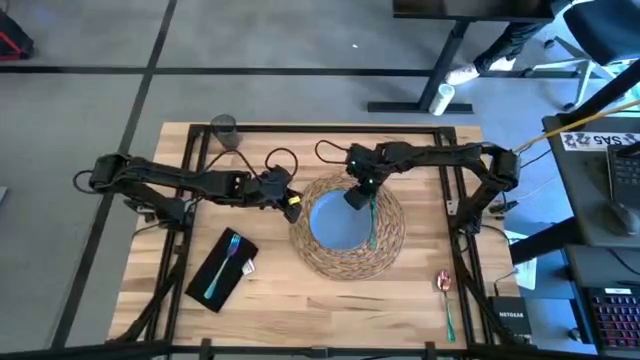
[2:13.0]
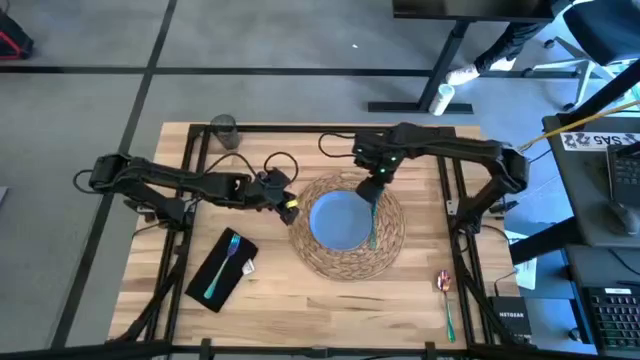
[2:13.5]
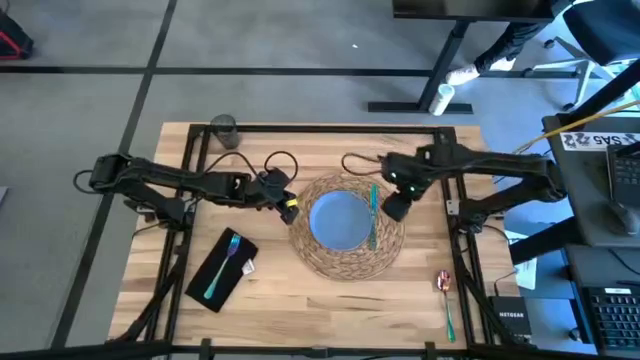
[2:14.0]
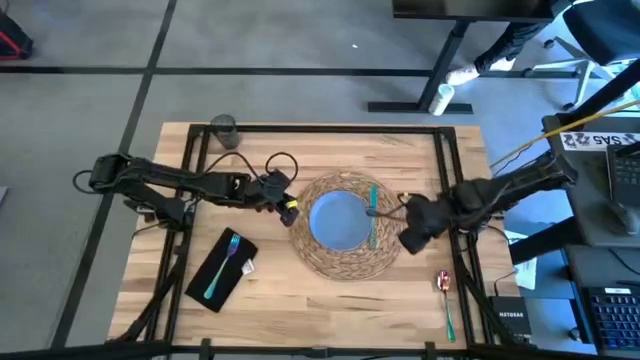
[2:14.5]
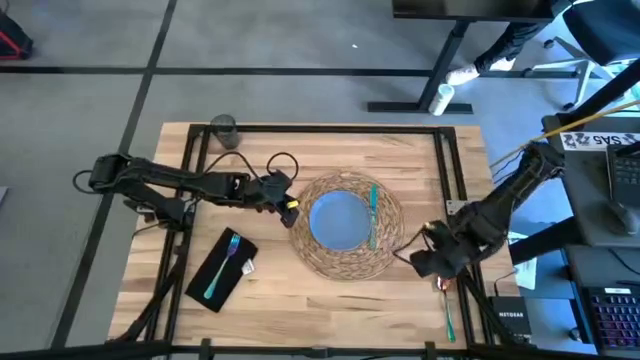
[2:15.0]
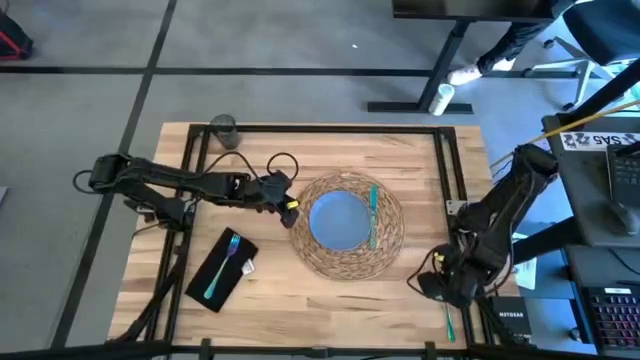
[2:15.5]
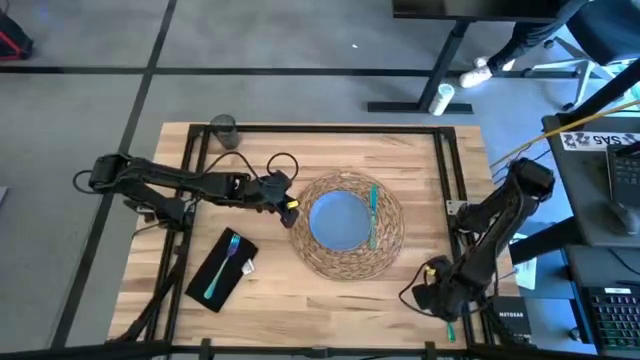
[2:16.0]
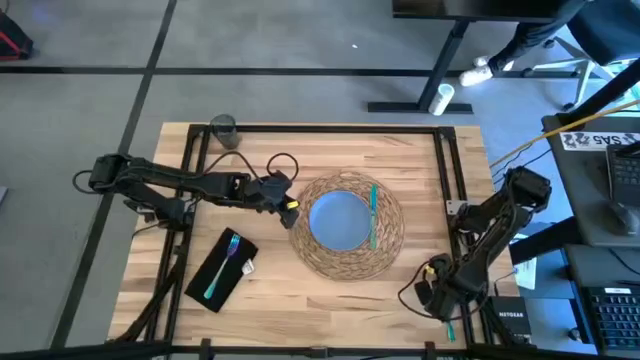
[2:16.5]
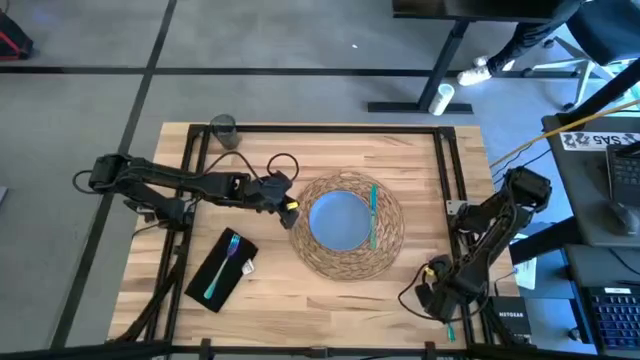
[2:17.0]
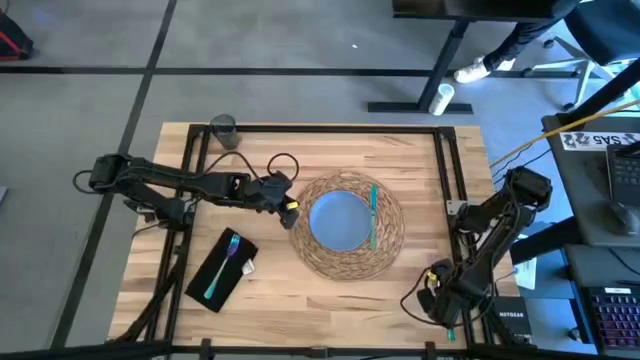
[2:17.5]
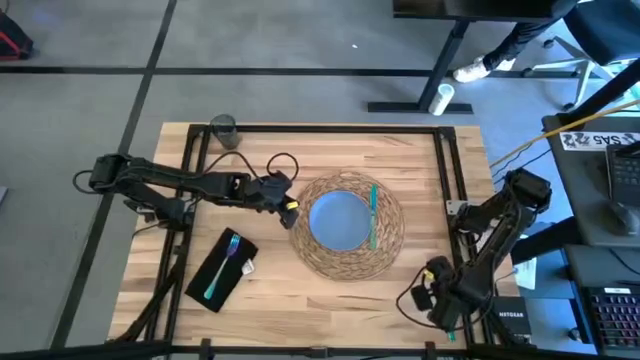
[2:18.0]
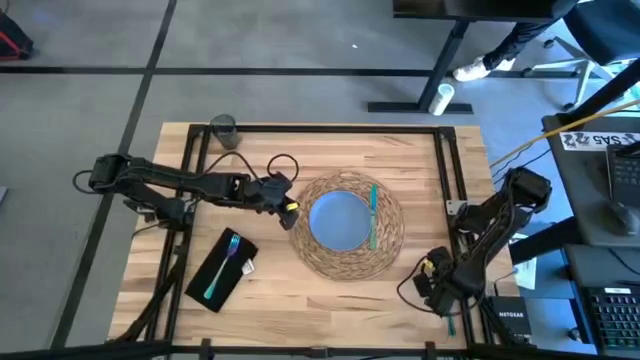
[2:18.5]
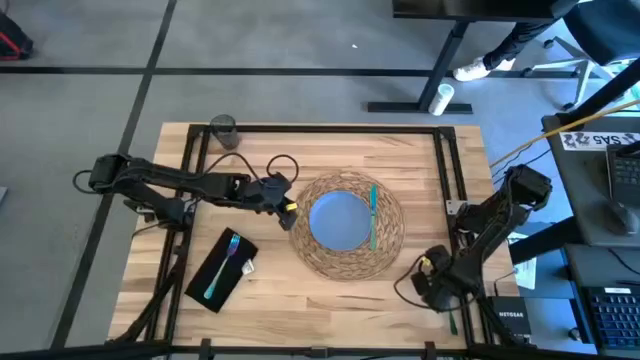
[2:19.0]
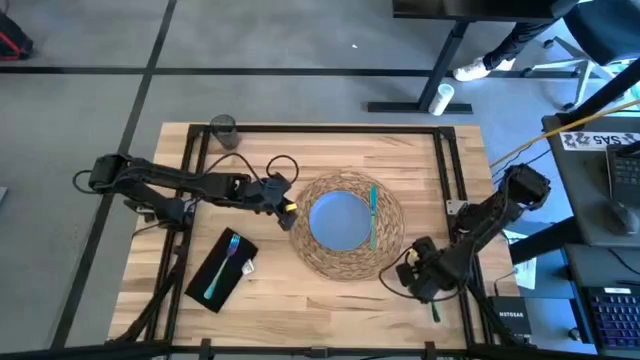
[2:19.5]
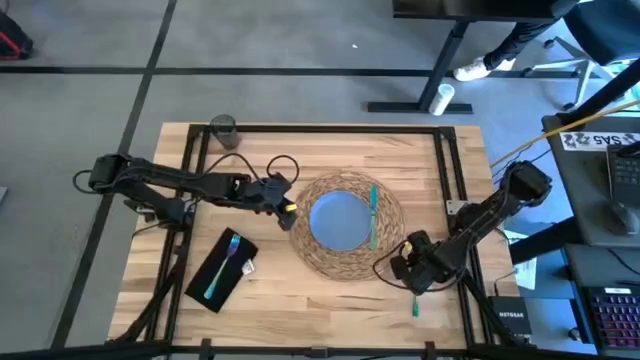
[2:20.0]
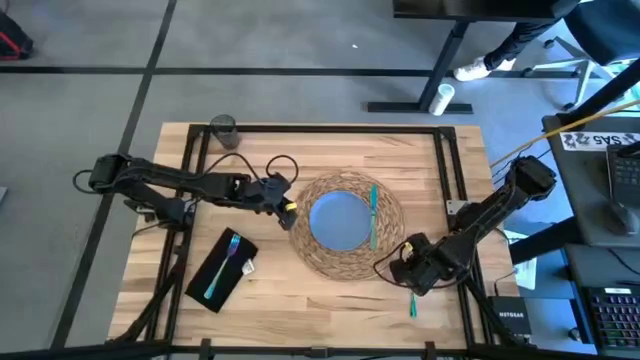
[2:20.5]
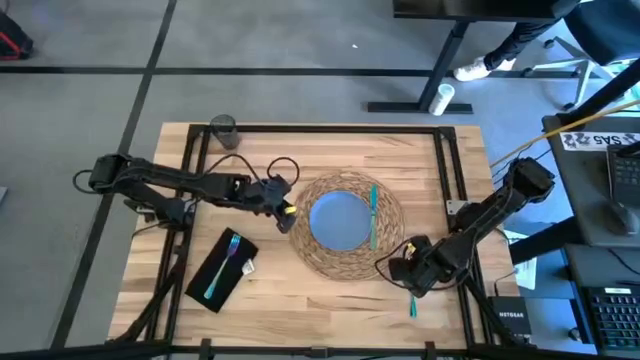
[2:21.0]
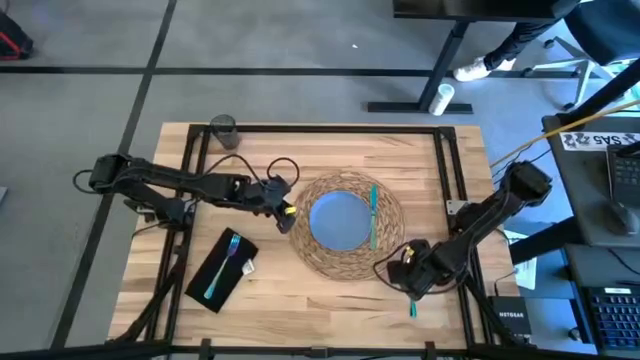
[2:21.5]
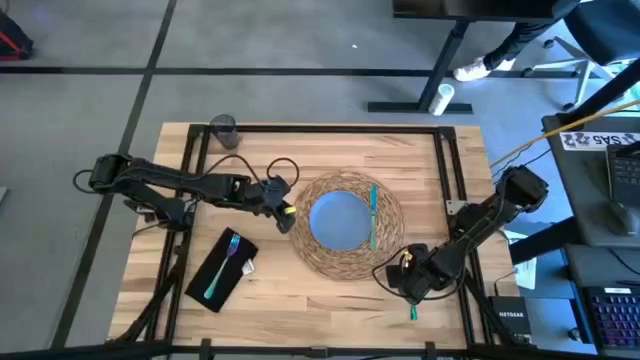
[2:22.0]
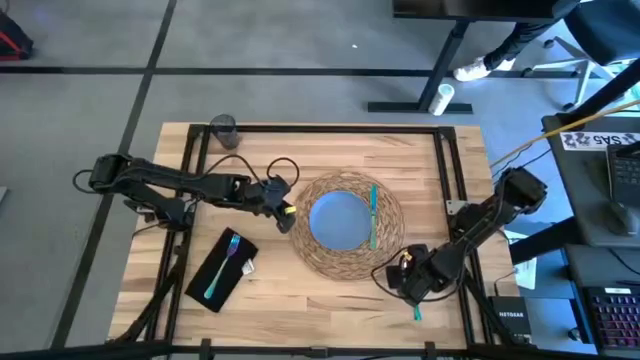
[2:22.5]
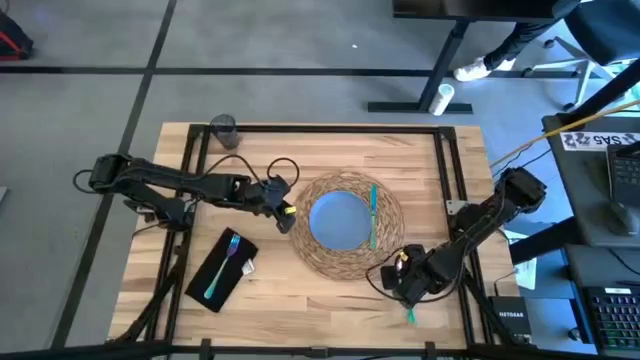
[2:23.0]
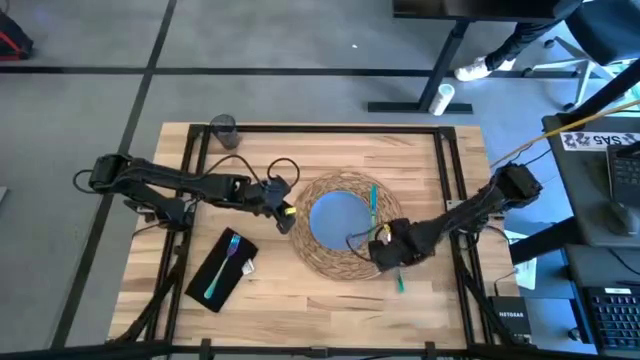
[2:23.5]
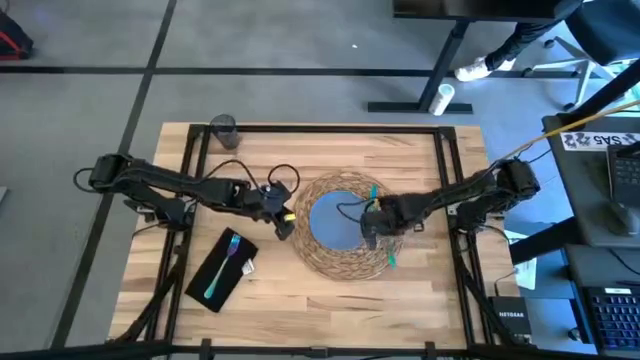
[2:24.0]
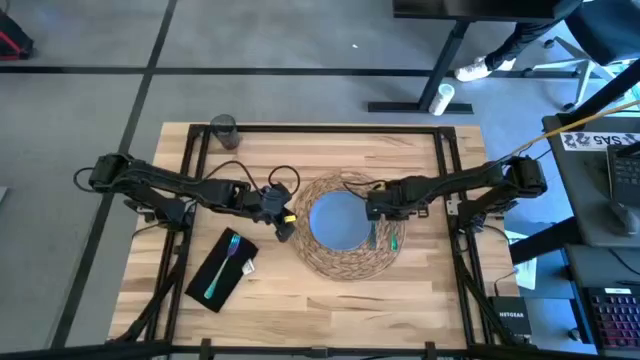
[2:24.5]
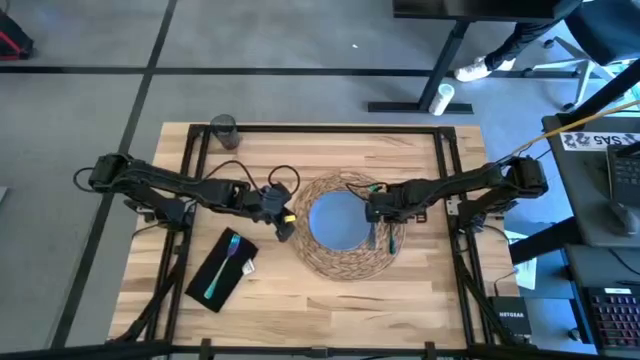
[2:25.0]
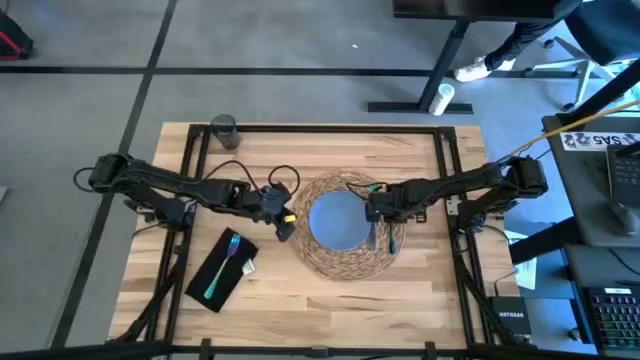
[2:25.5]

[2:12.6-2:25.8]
Task: Set table place
Put the blue spoon beside the blue knife

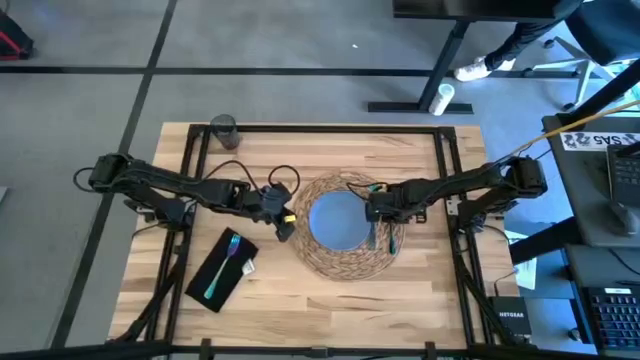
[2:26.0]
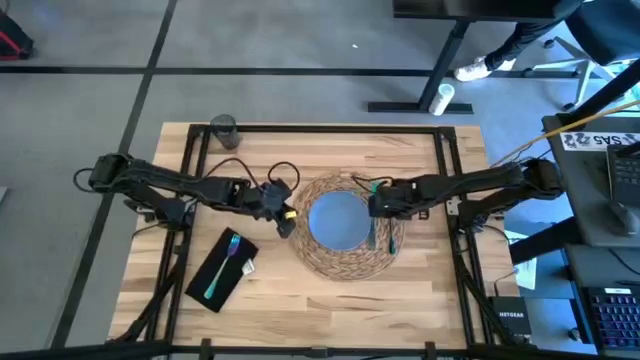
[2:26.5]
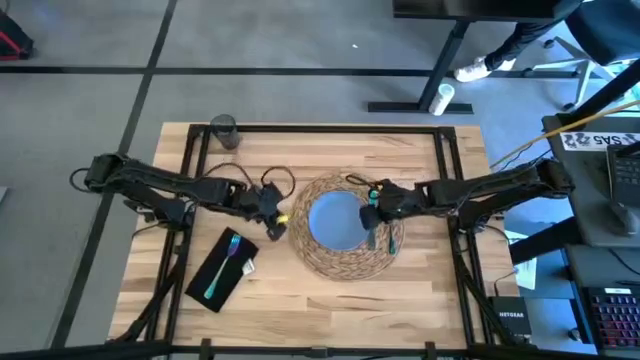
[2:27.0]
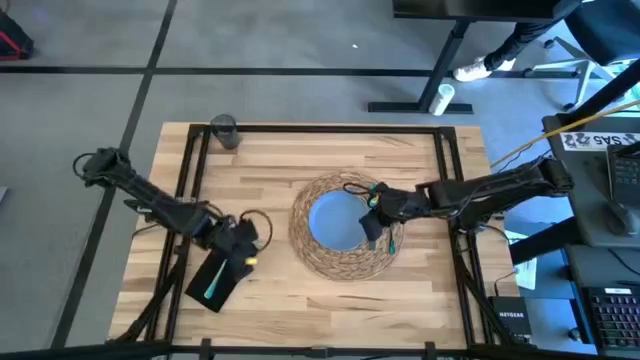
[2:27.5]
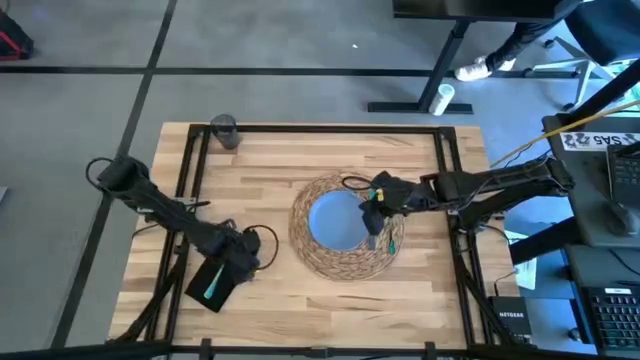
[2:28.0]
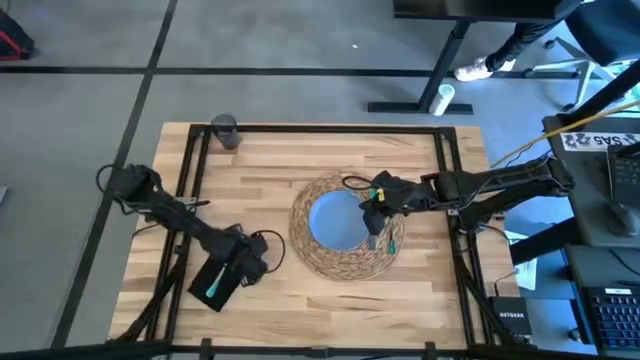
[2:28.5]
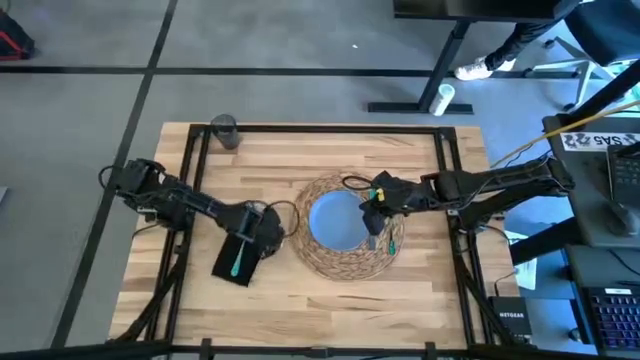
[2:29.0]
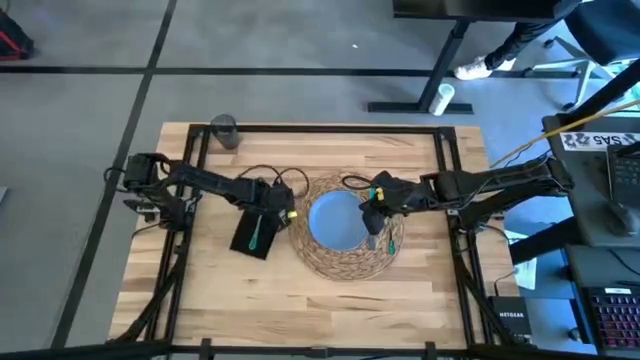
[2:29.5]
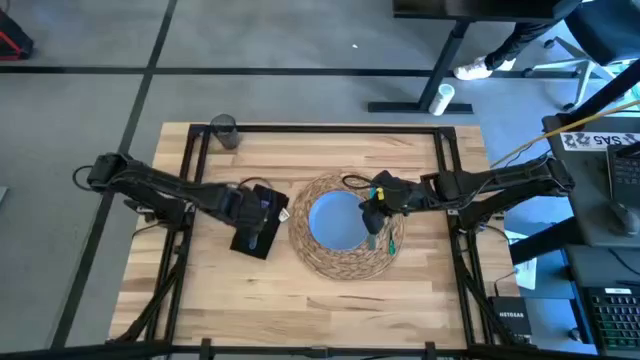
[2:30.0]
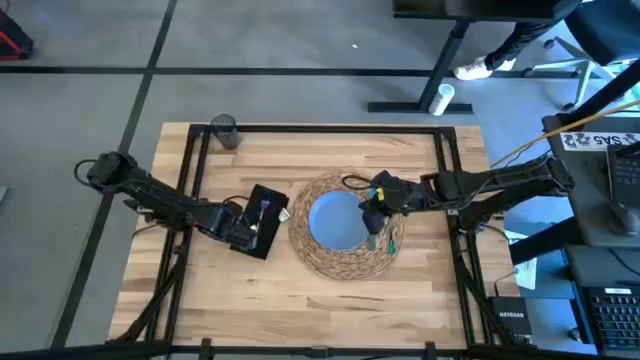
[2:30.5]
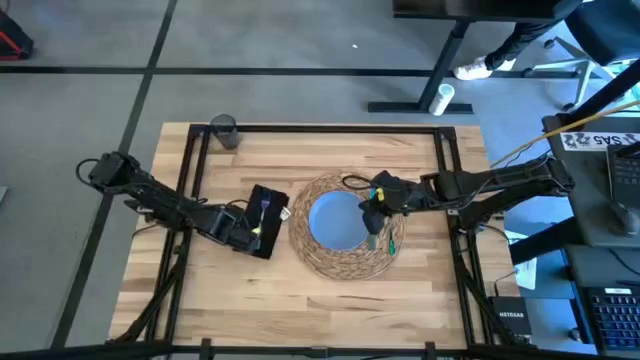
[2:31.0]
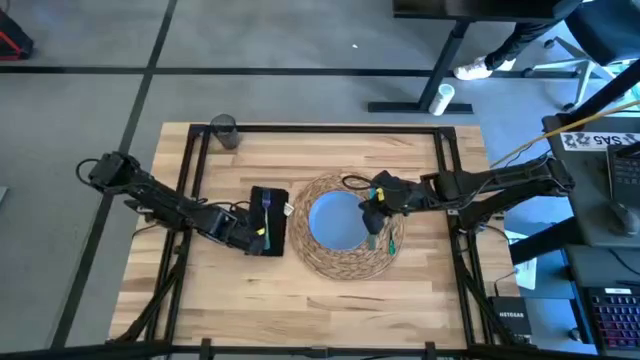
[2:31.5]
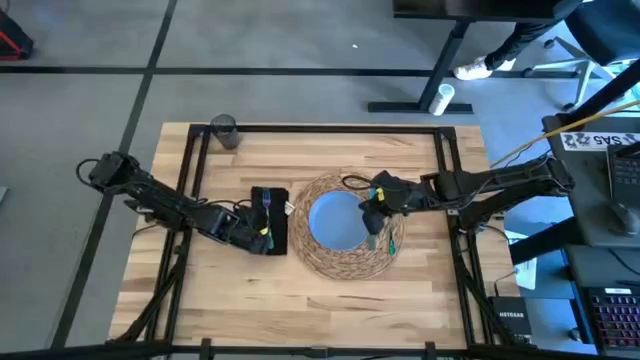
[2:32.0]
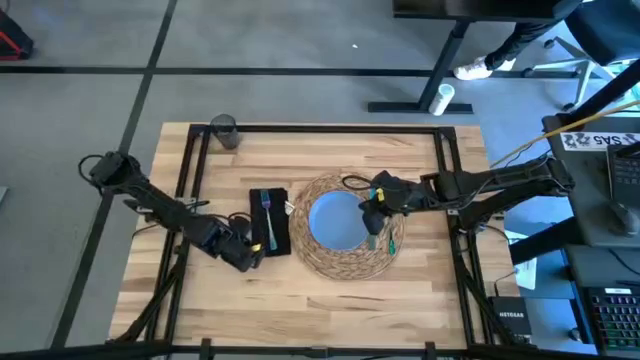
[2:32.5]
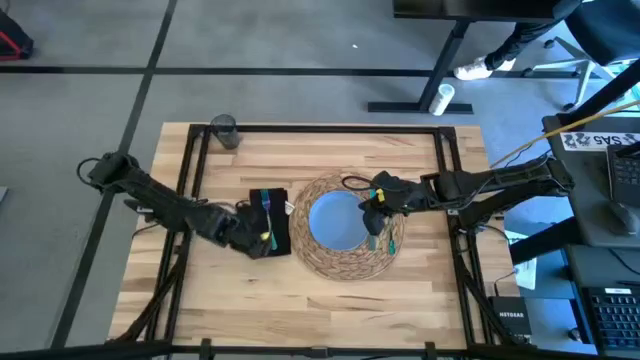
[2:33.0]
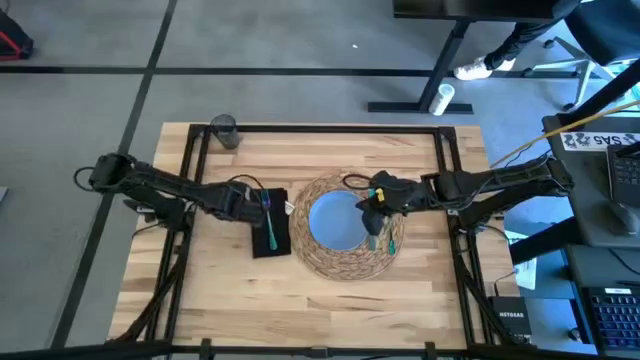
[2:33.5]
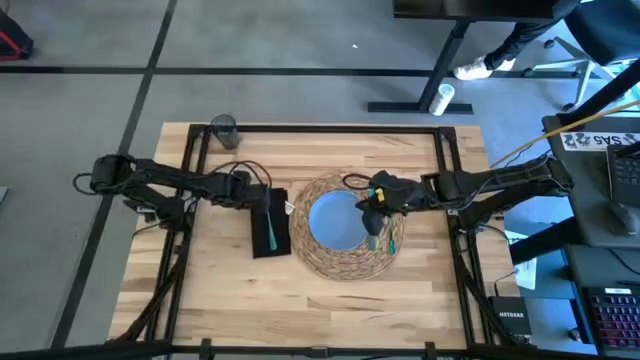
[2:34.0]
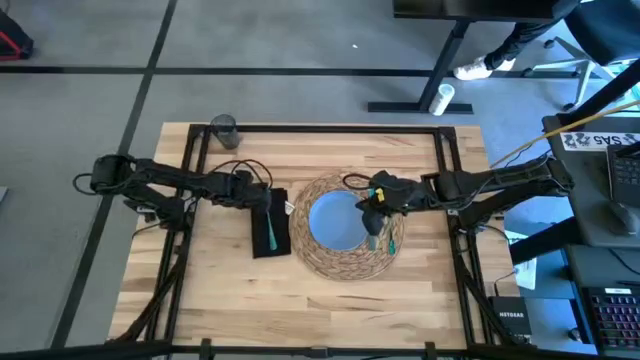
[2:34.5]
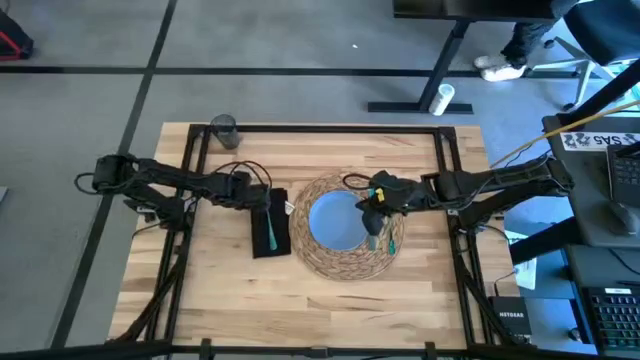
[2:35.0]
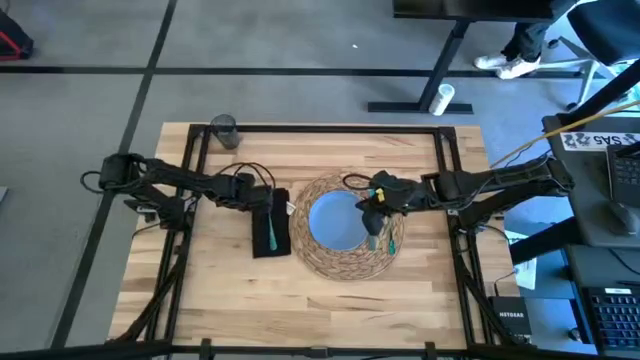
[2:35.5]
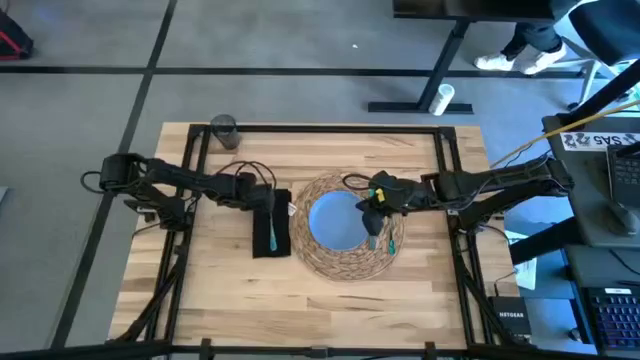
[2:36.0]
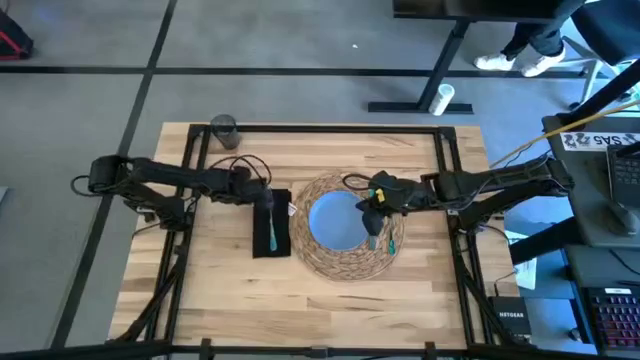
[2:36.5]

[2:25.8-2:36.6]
Move the black table napkin to the left of the brown placemat
